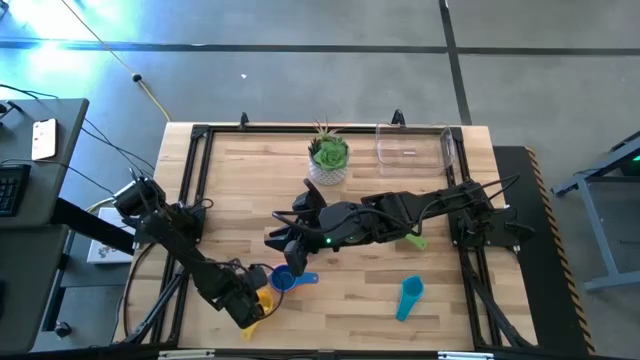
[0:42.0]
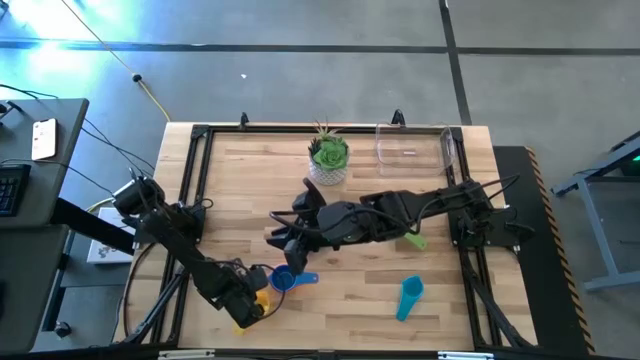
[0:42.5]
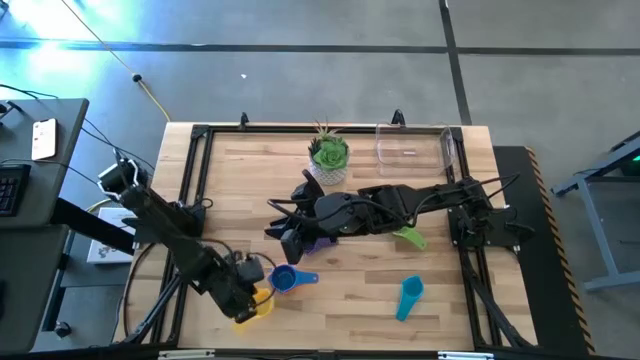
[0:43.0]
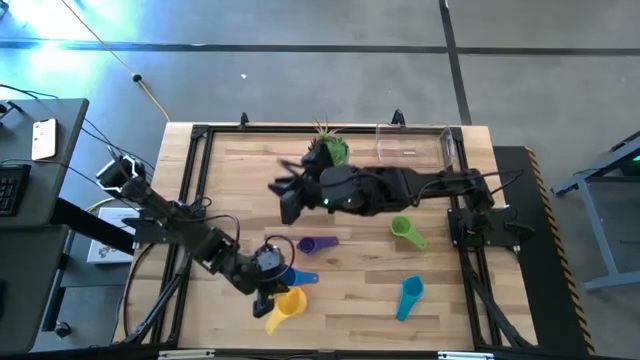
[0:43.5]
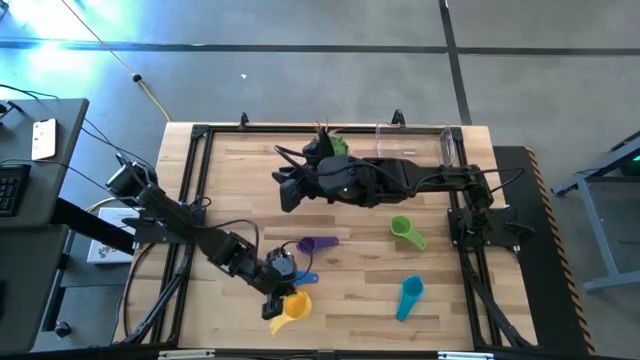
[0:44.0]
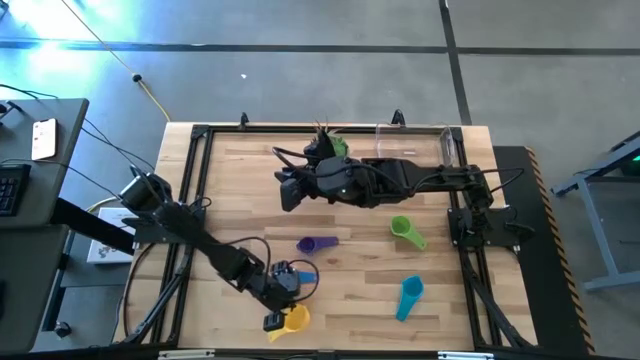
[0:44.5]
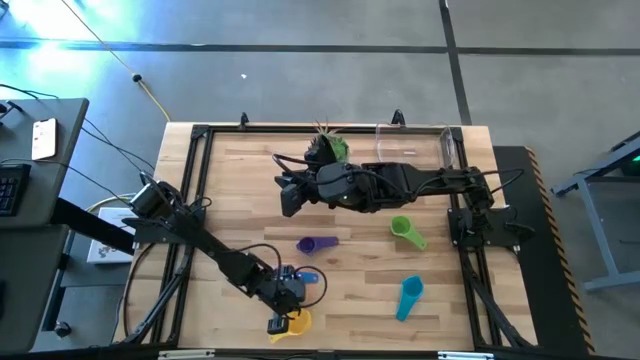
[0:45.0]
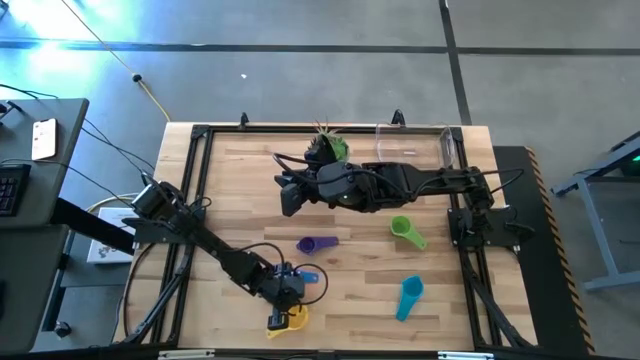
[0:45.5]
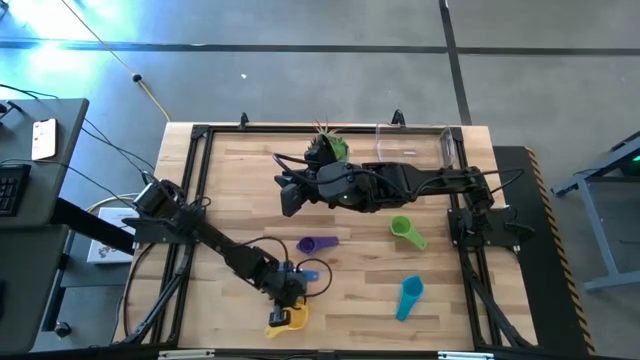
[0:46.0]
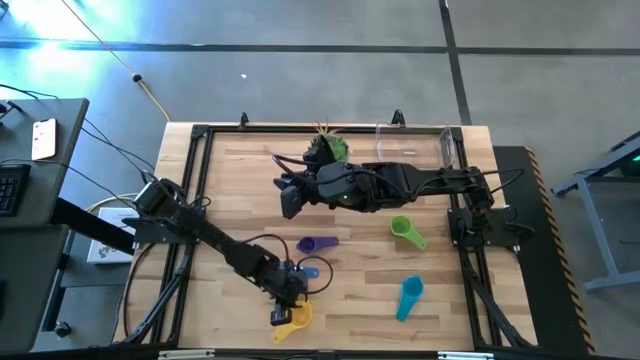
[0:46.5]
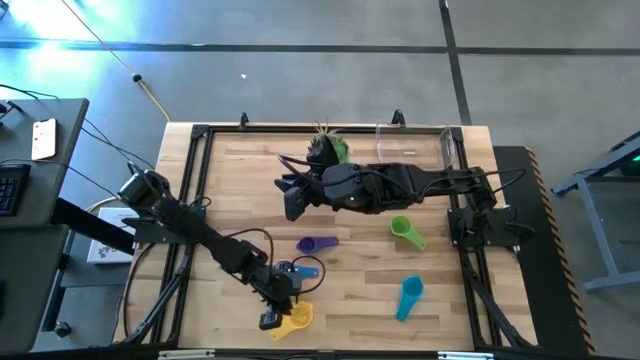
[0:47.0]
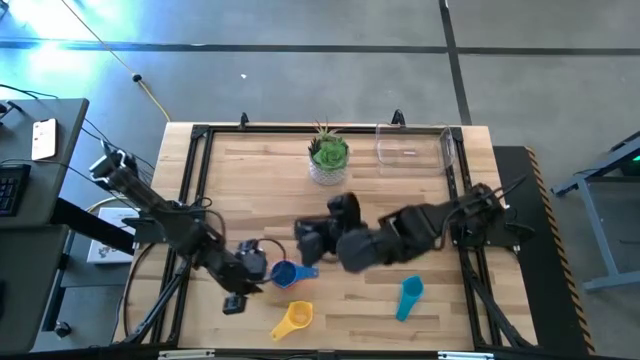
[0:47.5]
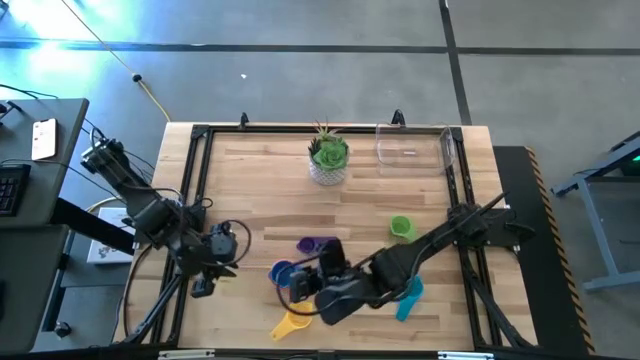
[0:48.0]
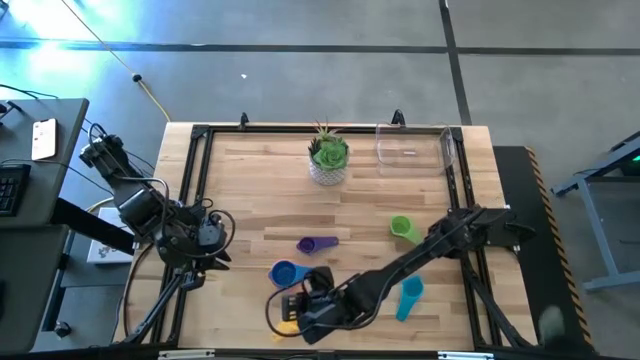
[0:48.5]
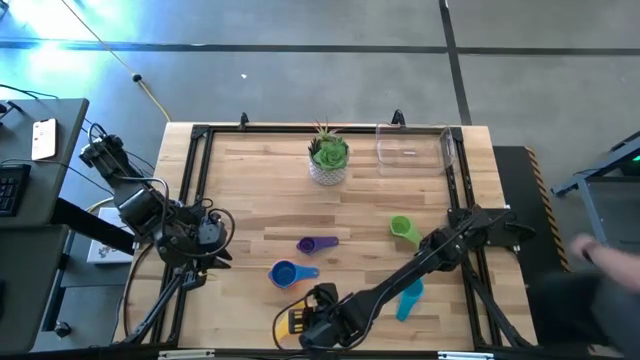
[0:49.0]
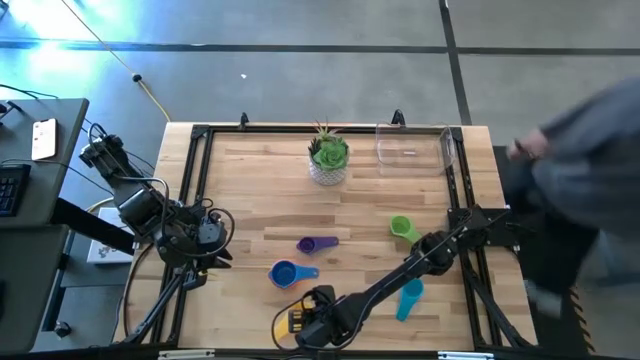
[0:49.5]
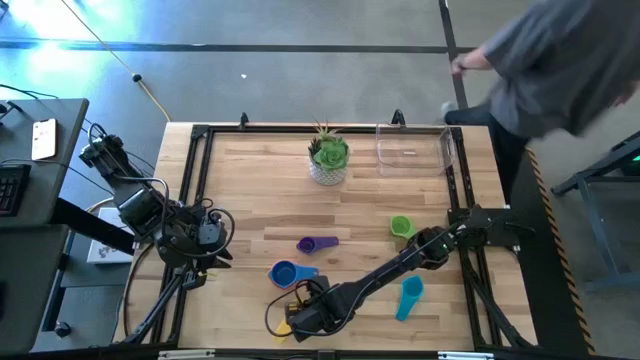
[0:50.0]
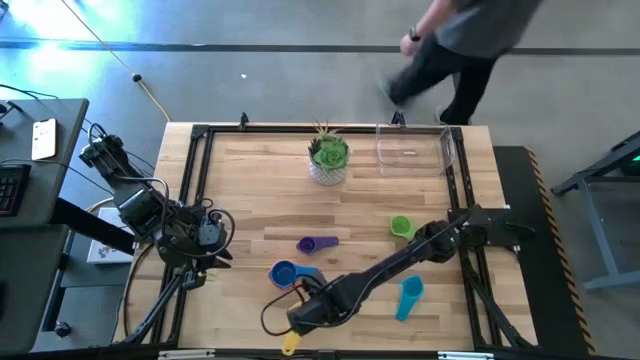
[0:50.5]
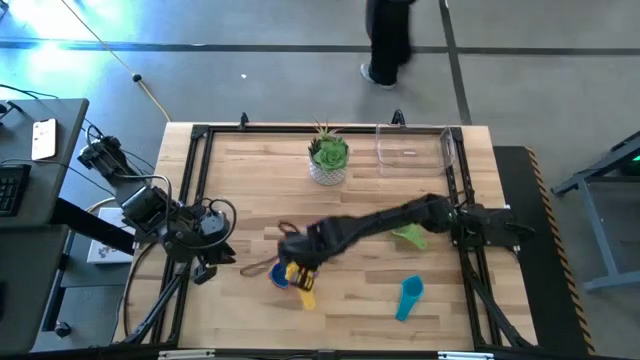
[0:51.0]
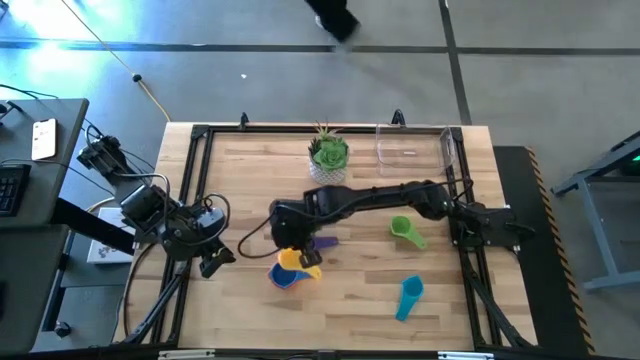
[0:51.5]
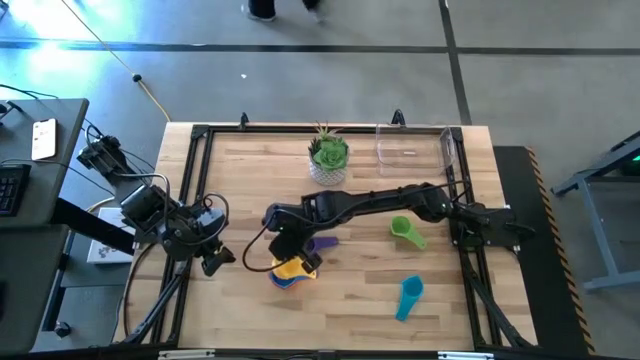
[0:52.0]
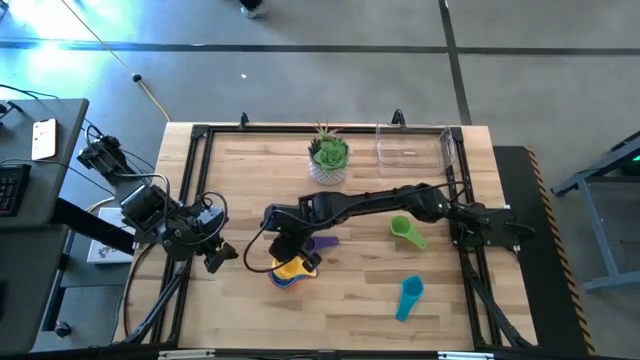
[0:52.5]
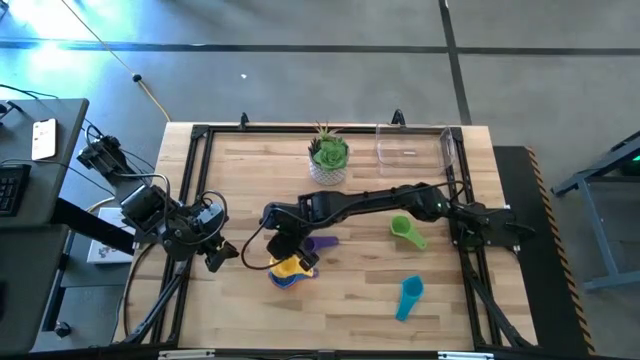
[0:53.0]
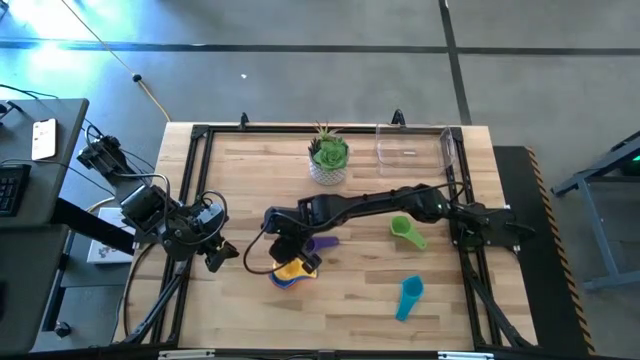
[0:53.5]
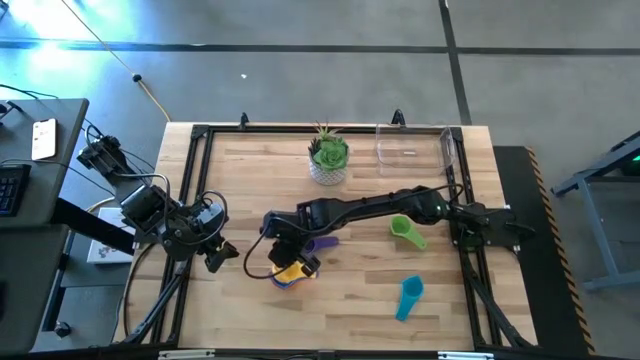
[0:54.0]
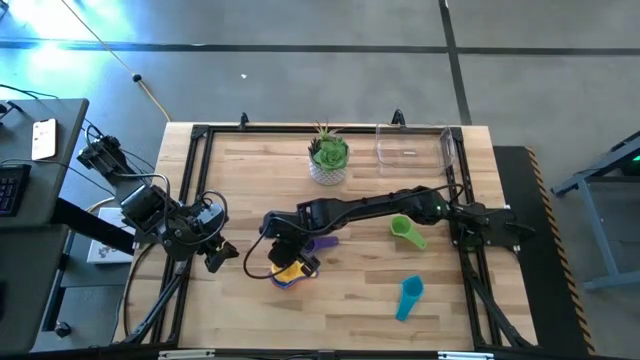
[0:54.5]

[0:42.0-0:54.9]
Task: Nest measuring cups in basket
Stack the yellow measuring cup on top of the blue measuring cup

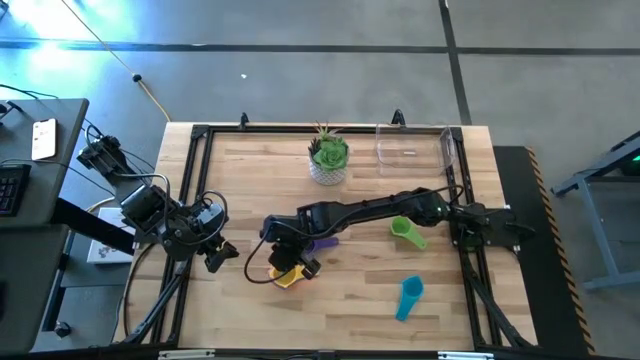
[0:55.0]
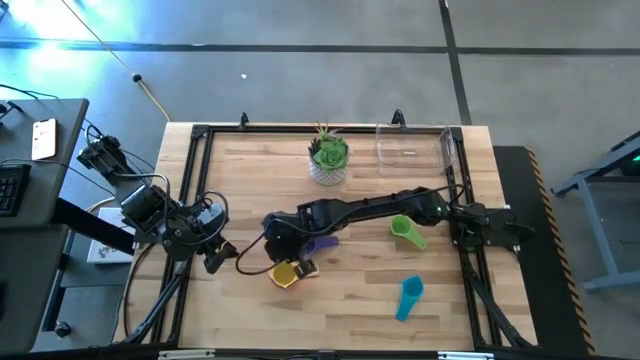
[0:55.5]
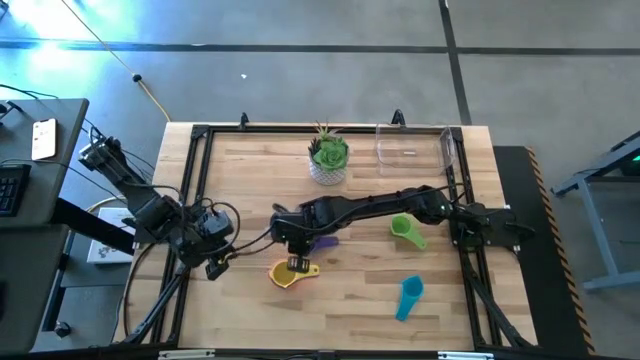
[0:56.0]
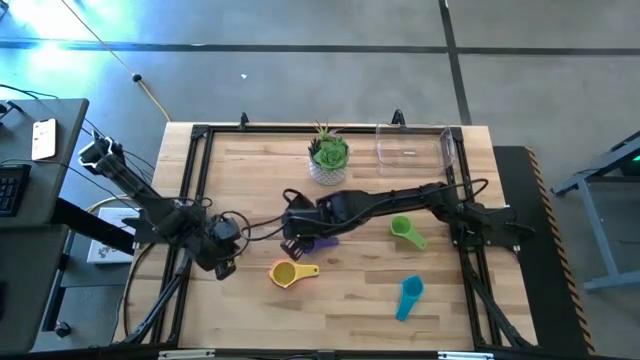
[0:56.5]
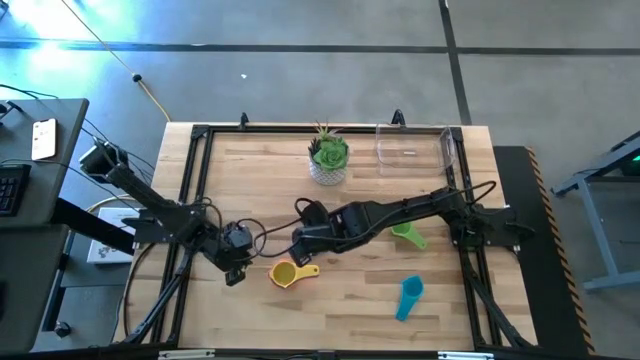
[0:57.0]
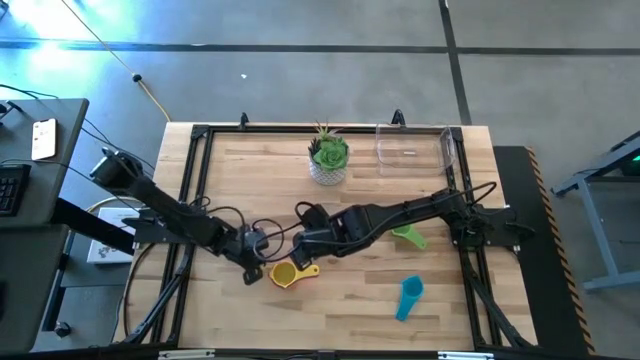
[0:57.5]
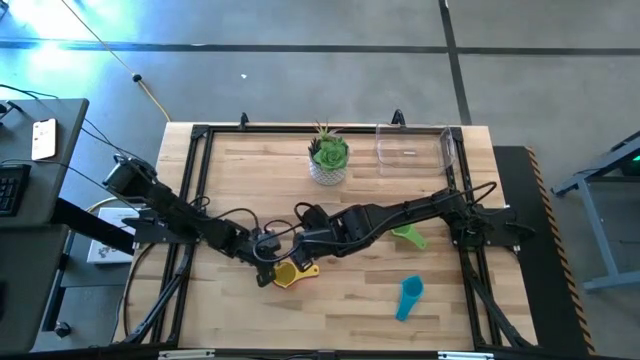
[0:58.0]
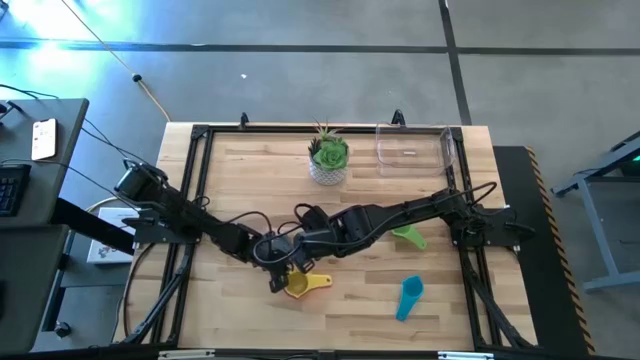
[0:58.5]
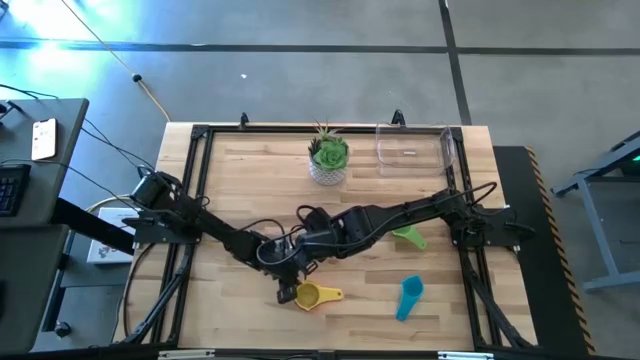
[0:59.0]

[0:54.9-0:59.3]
Move the nested measuring cups to the bottom of the table

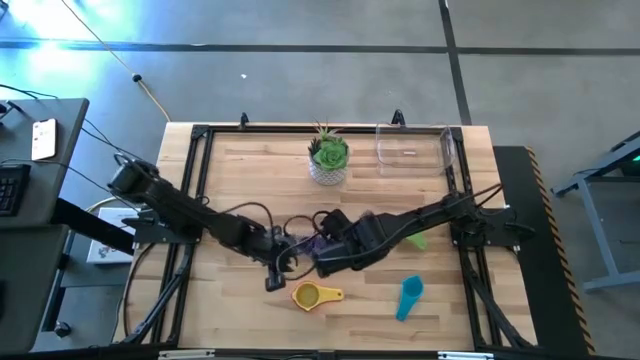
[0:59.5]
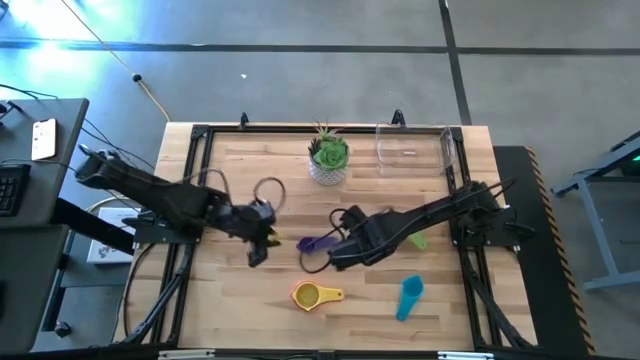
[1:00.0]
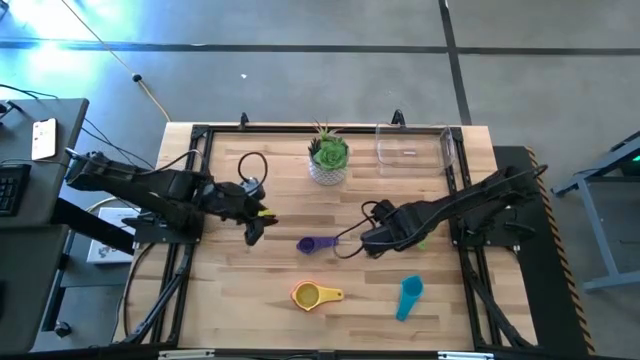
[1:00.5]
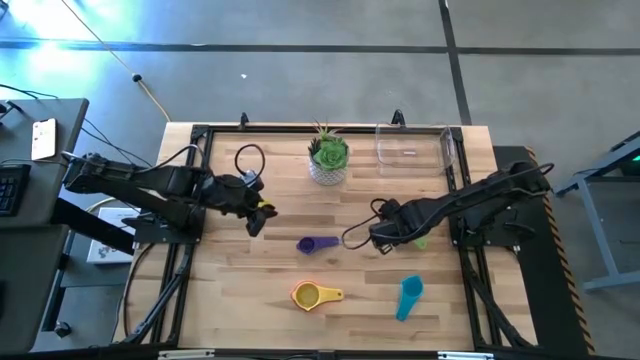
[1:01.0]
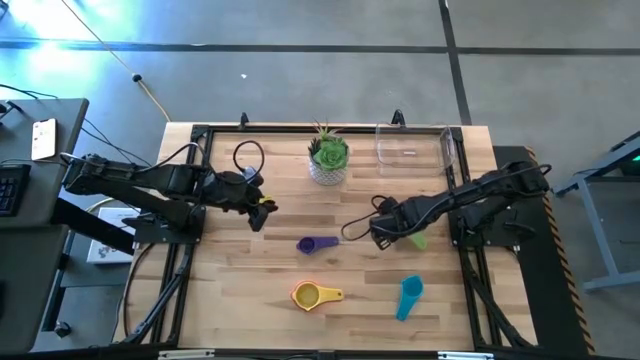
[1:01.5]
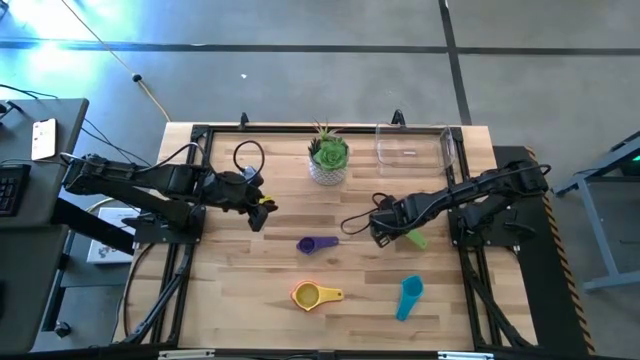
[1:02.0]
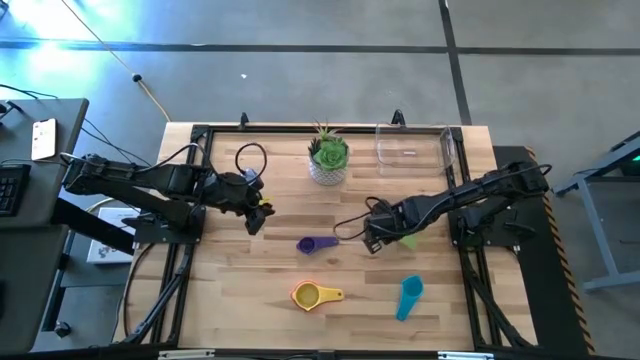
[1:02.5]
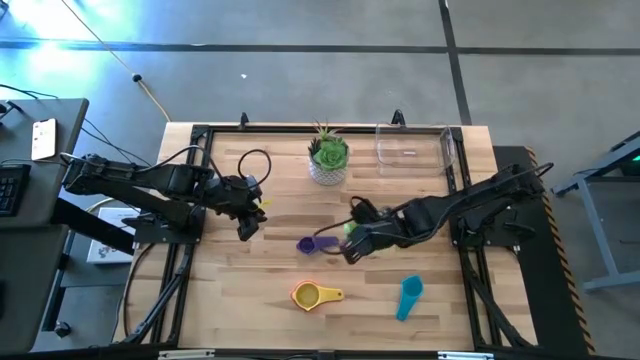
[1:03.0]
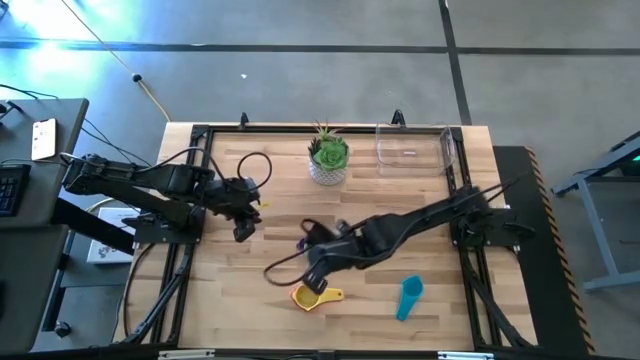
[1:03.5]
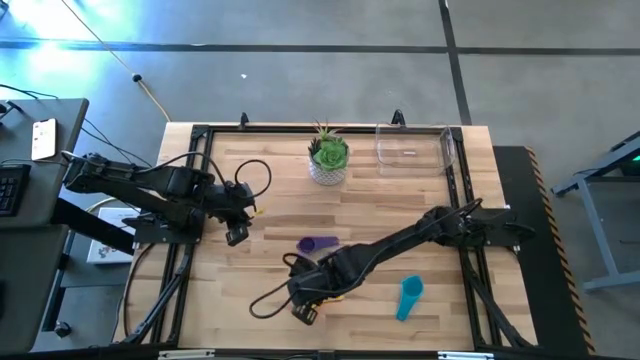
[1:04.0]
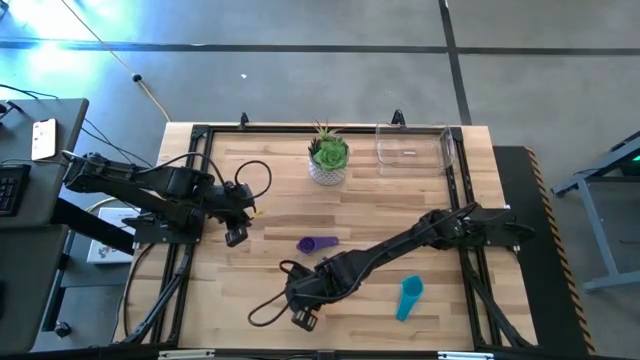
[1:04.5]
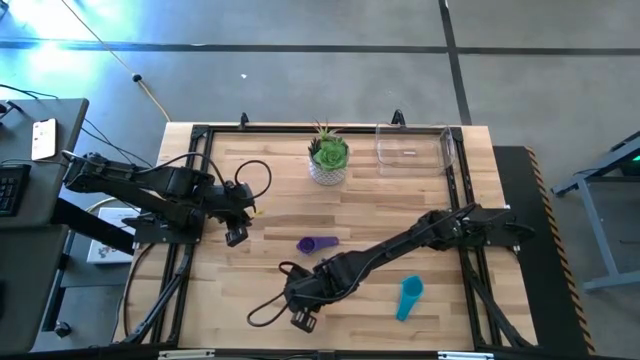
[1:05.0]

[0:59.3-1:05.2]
Stack the green measuring cup on top of the yellow measuring cup
